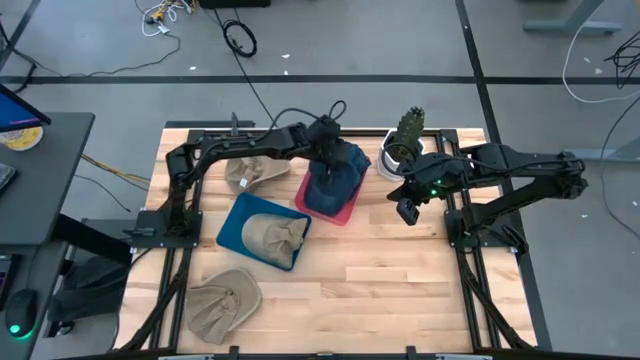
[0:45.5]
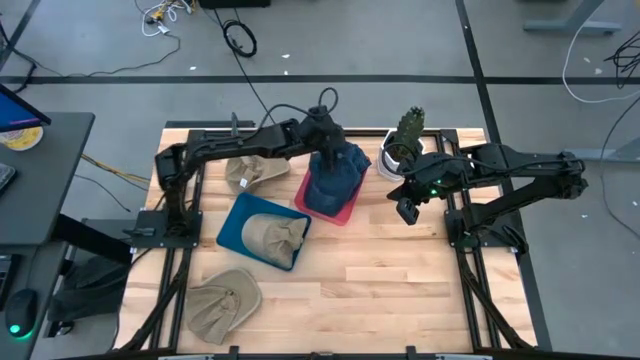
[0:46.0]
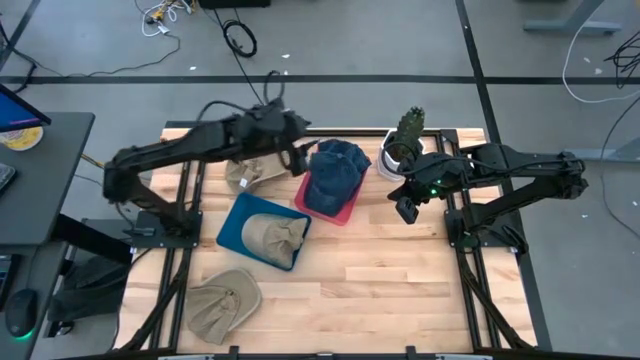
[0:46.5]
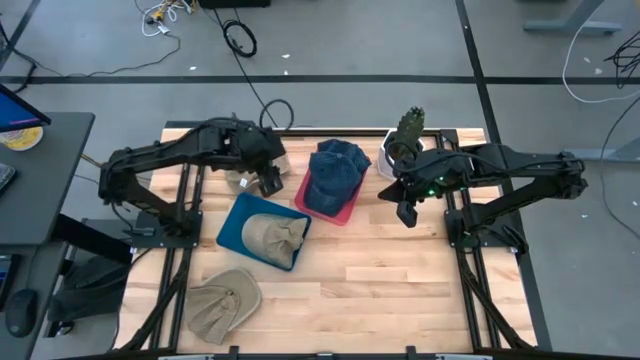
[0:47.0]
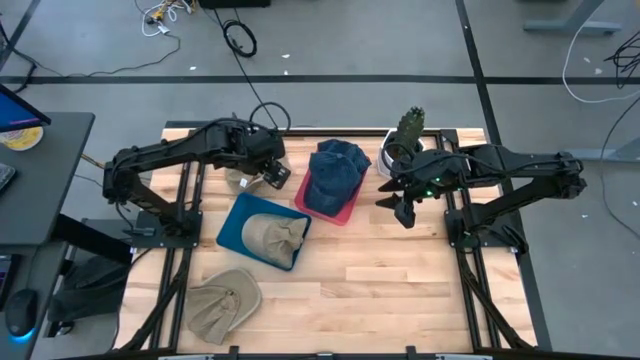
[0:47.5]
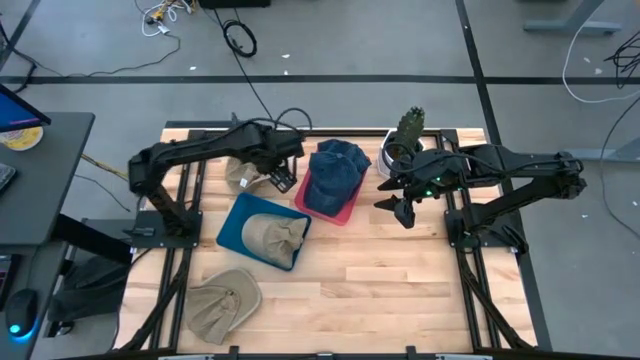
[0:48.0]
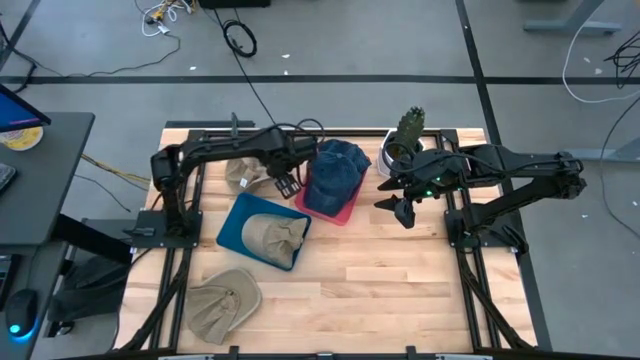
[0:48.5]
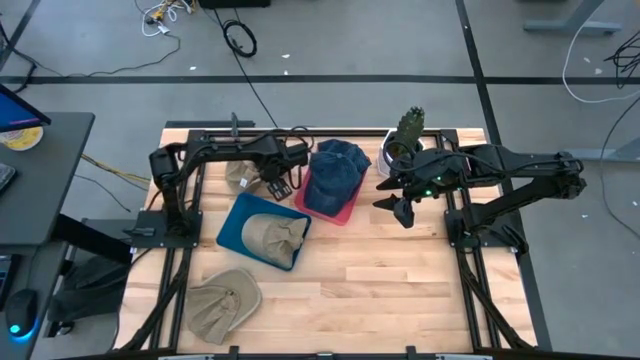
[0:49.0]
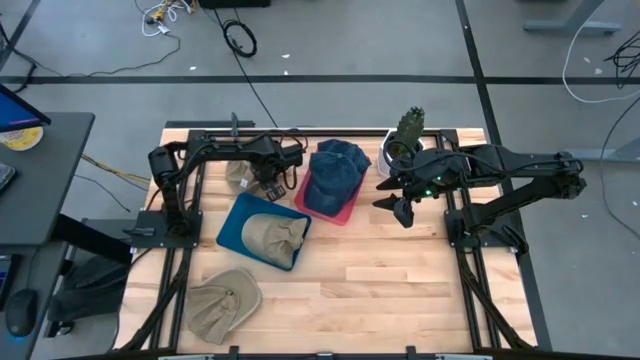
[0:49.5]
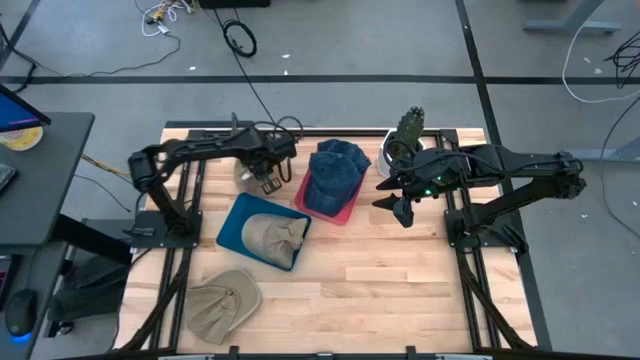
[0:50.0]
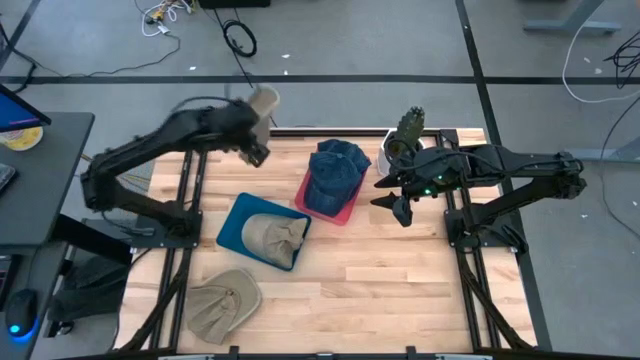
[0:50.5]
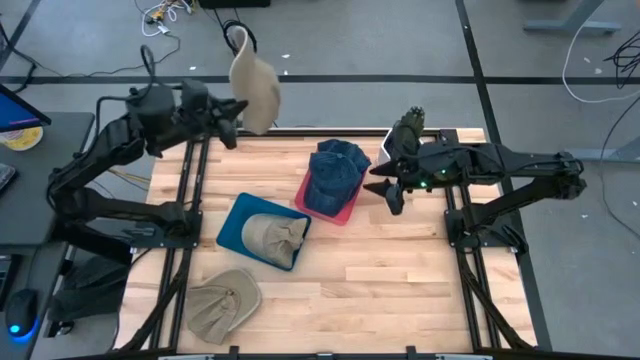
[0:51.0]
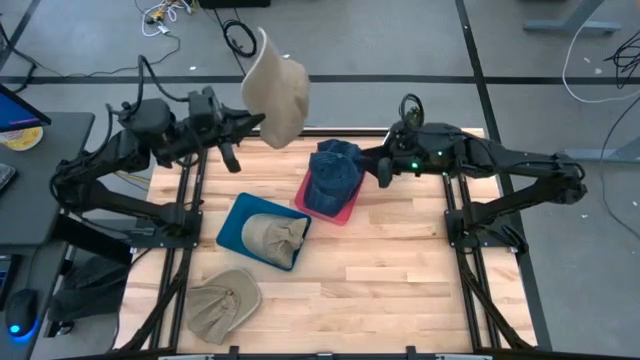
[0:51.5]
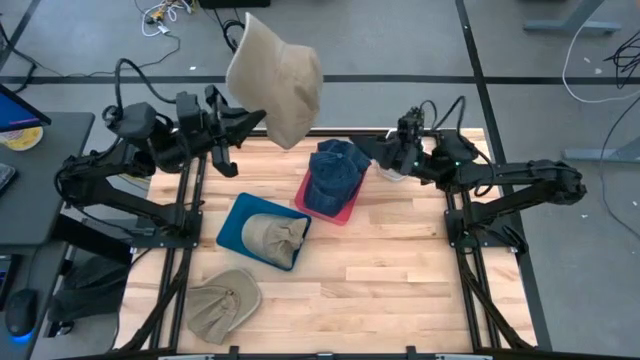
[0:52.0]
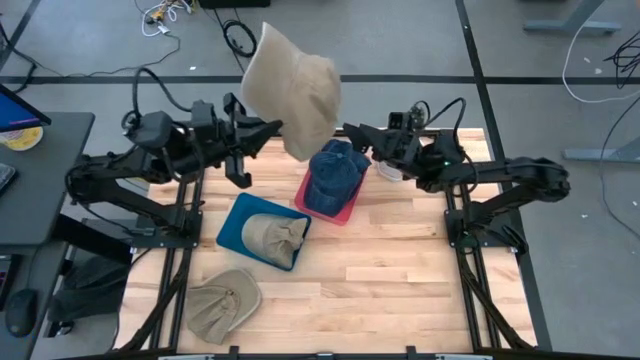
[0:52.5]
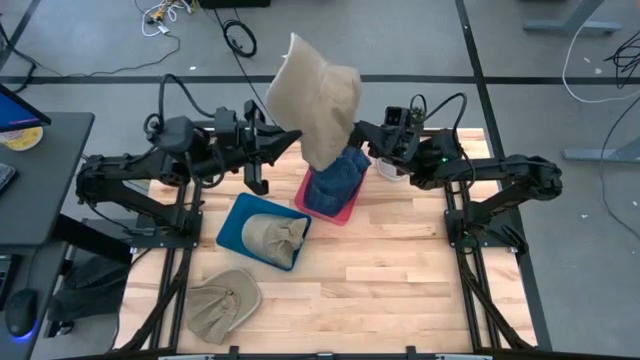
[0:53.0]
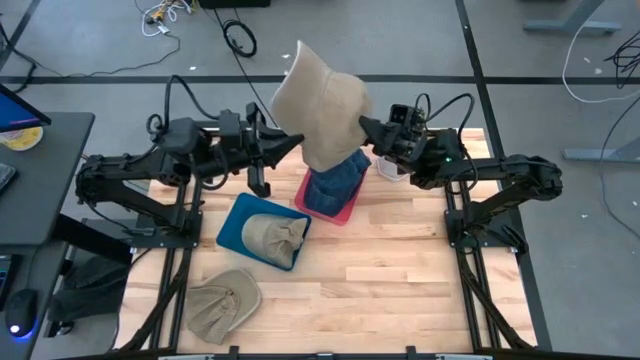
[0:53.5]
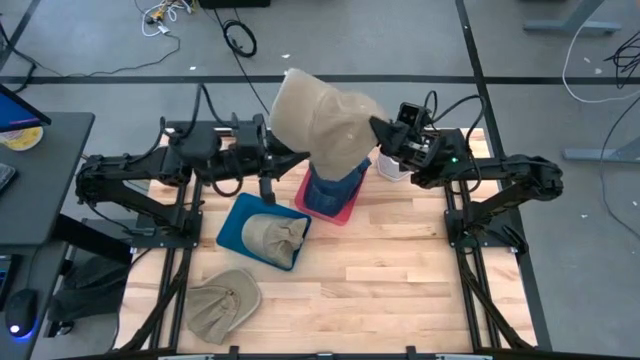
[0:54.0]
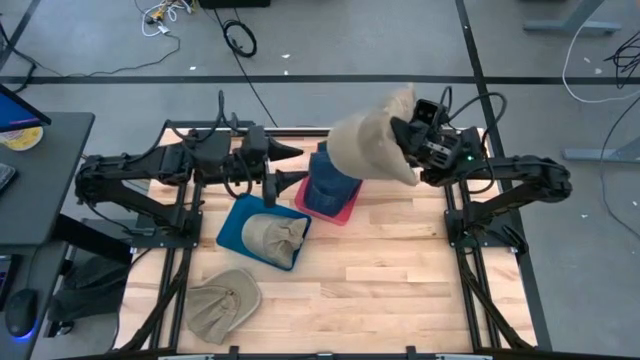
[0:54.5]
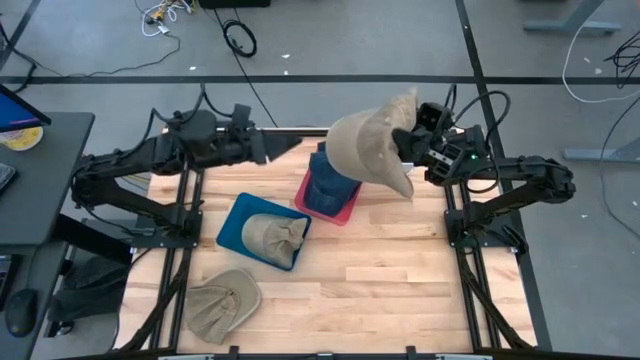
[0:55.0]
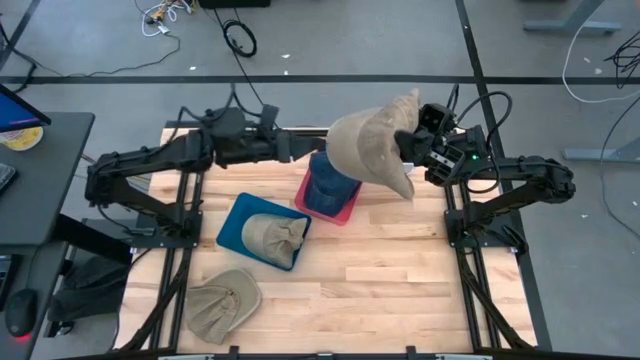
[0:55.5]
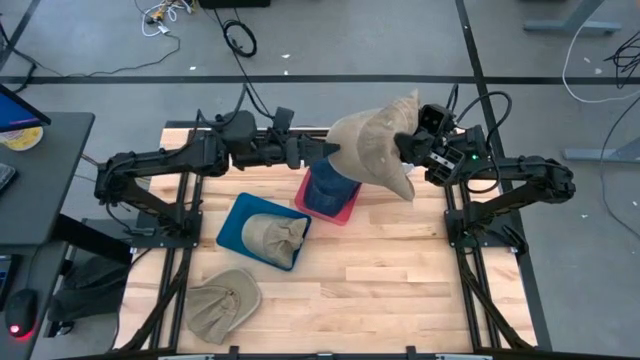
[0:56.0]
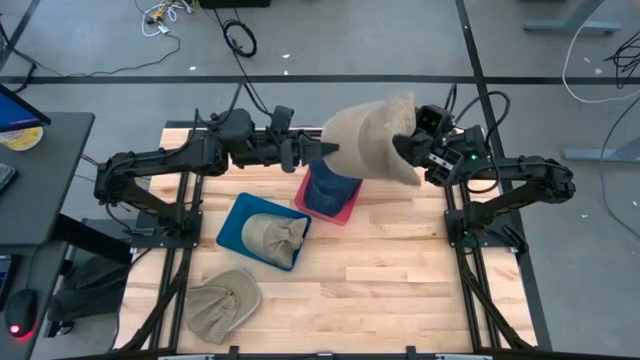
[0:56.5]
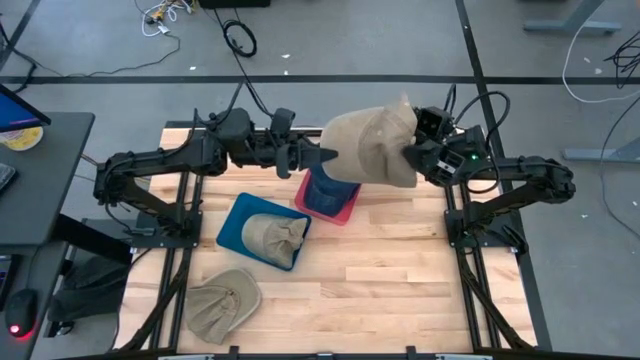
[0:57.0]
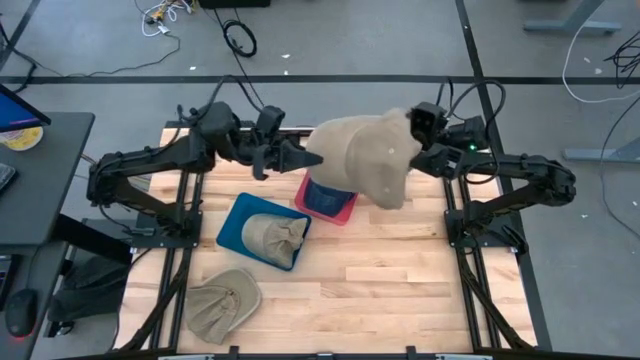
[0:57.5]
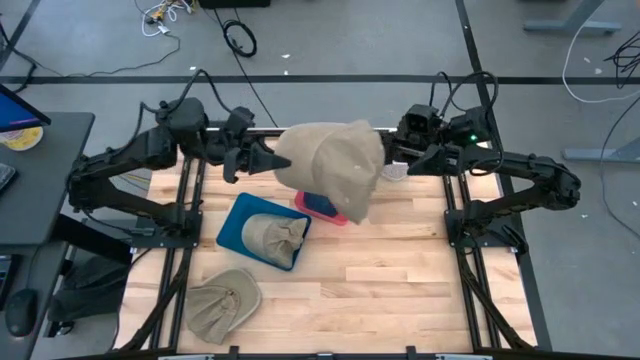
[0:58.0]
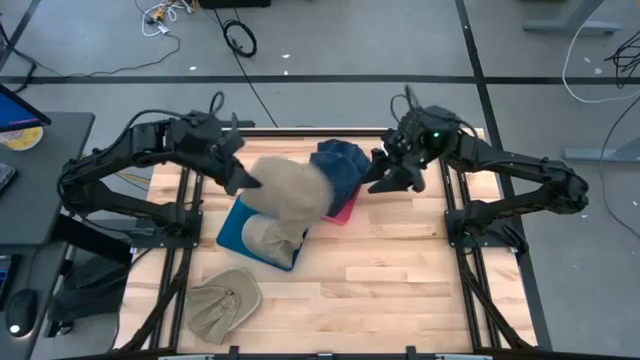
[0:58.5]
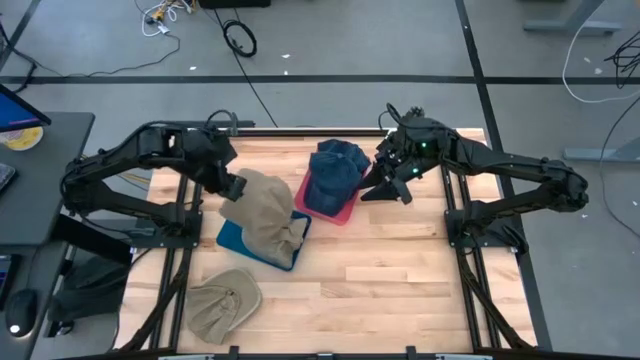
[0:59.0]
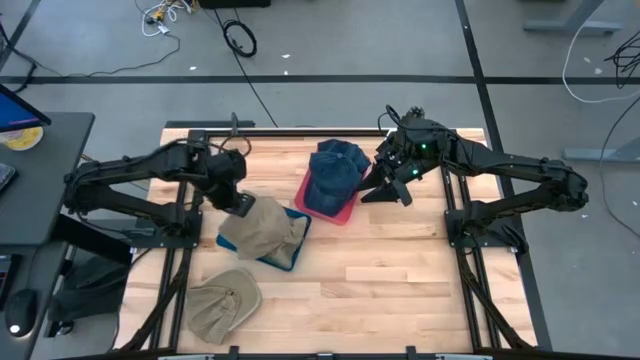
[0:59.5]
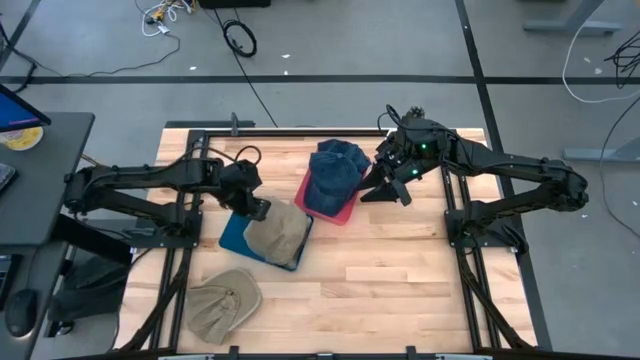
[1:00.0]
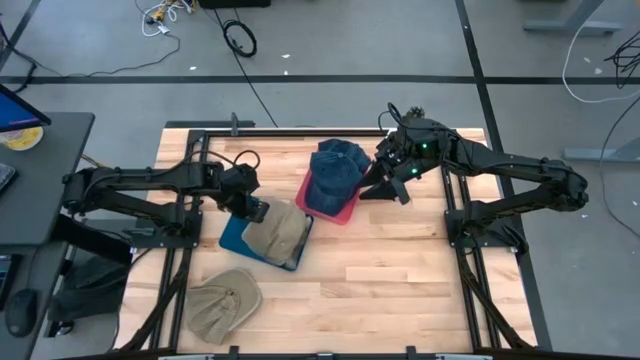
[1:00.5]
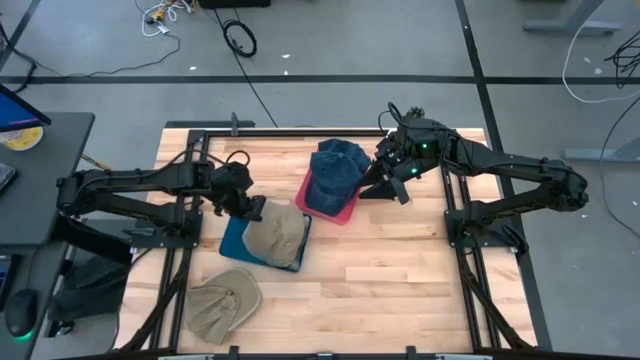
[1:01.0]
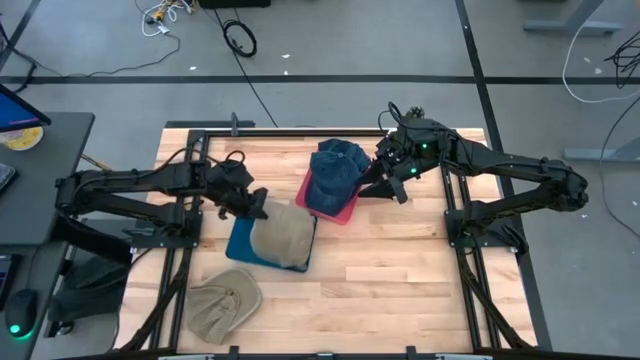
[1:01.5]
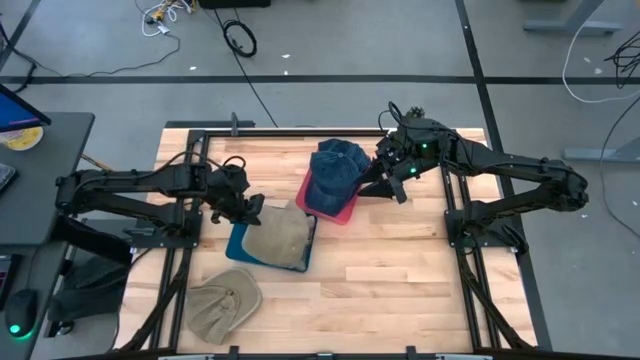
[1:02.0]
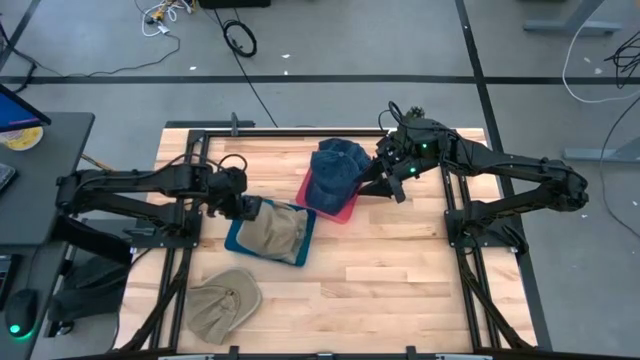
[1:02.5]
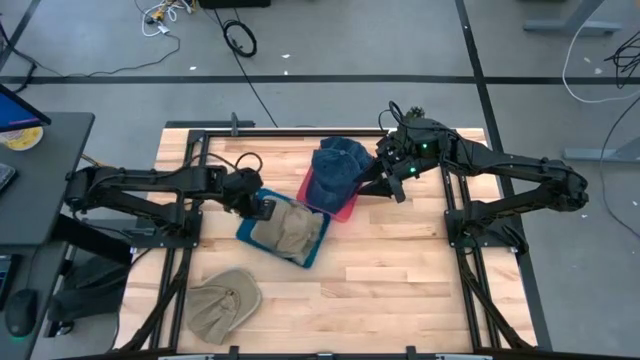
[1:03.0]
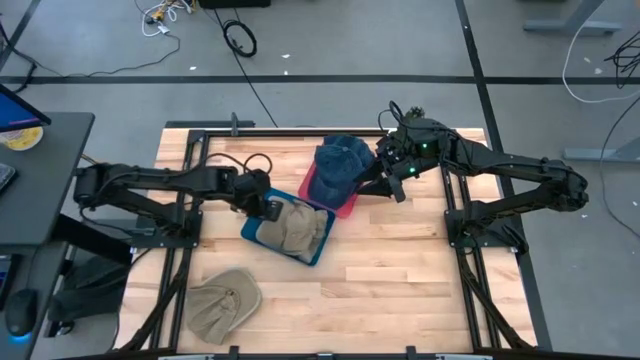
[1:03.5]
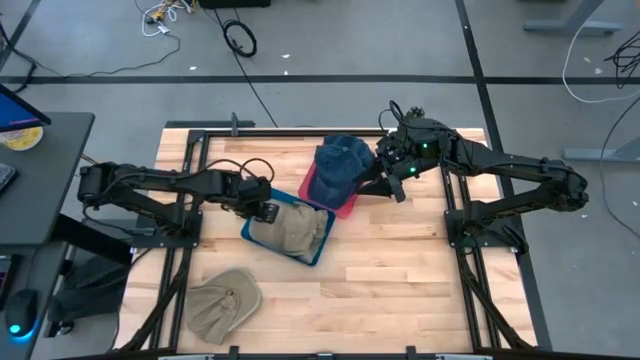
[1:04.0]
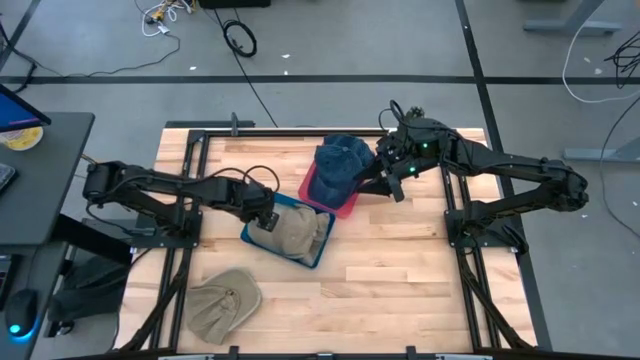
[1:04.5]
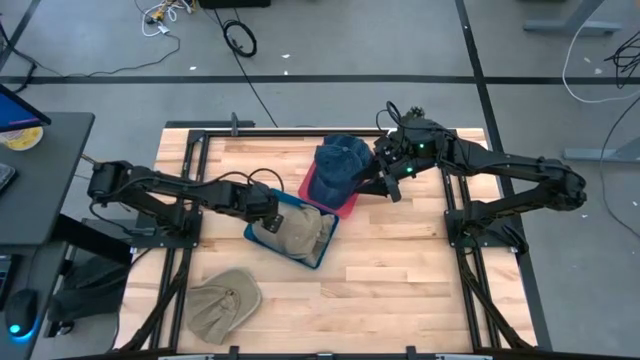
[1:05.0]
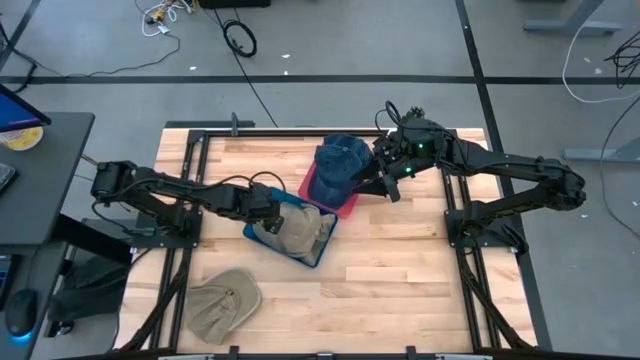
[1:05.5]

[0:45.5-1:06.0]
Task: Pick & Place hat
Put the top brown cap into the blue bin
